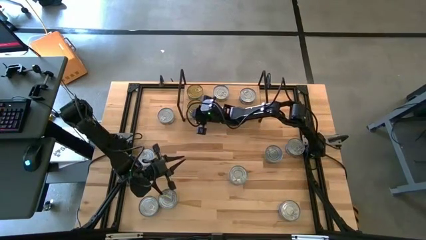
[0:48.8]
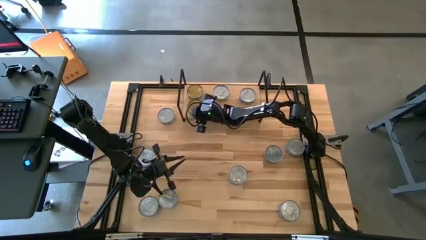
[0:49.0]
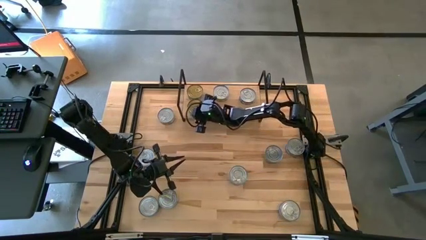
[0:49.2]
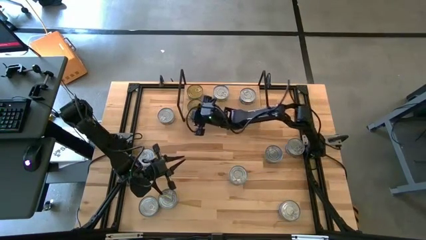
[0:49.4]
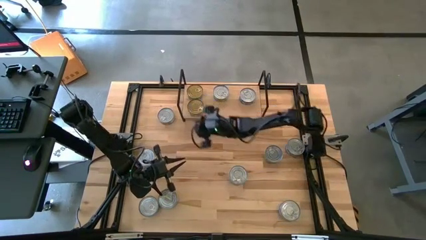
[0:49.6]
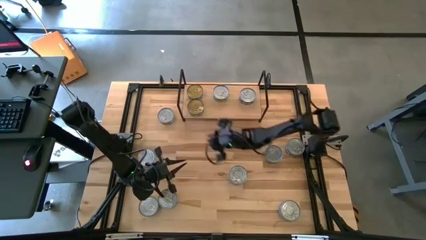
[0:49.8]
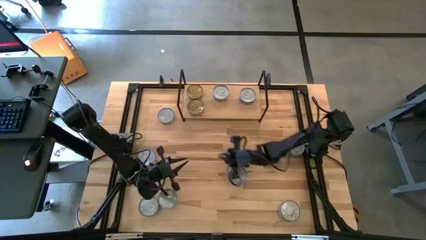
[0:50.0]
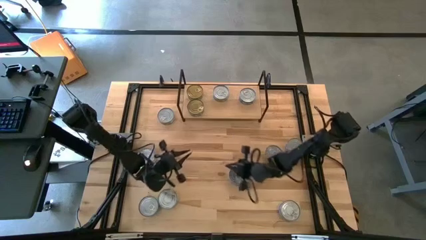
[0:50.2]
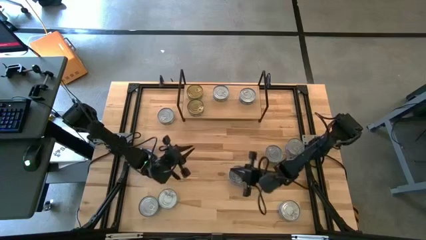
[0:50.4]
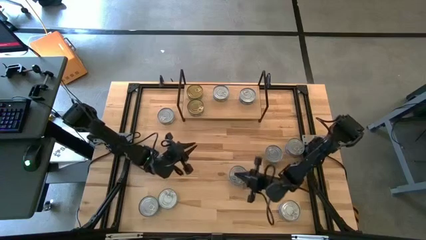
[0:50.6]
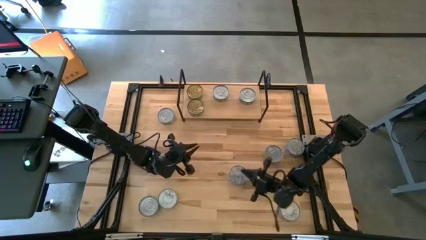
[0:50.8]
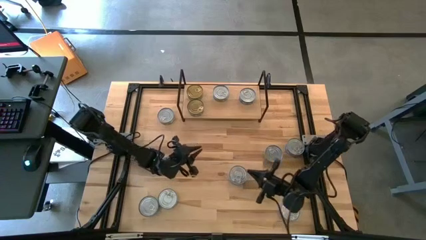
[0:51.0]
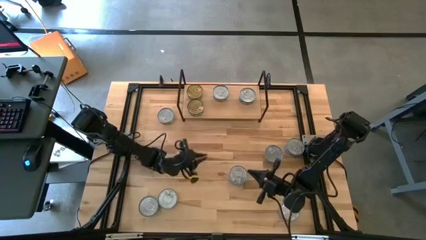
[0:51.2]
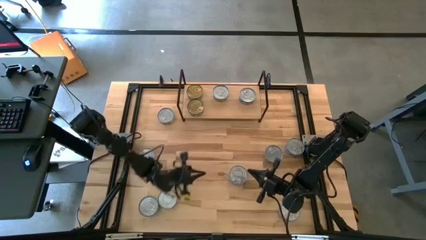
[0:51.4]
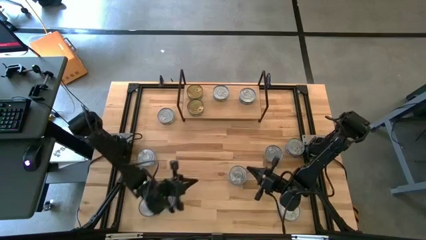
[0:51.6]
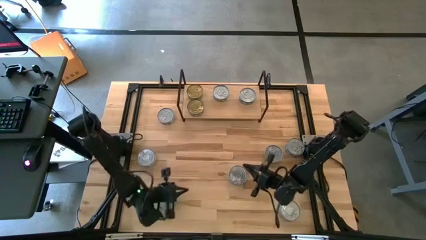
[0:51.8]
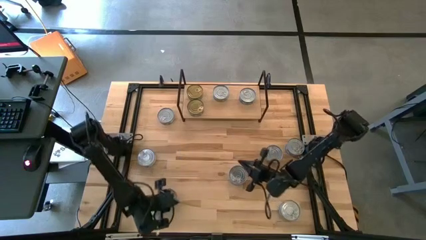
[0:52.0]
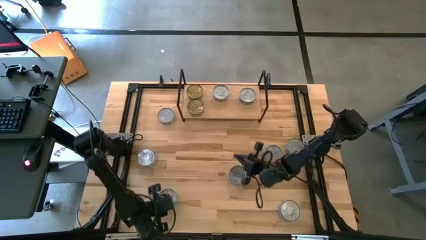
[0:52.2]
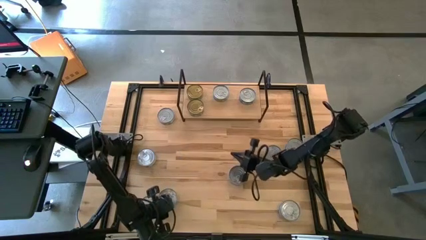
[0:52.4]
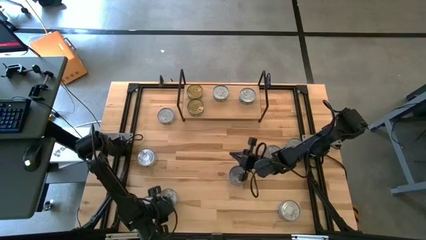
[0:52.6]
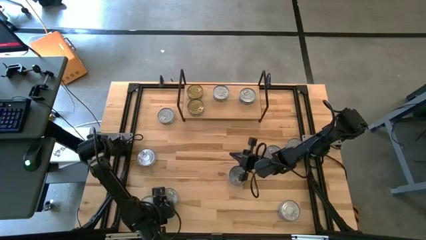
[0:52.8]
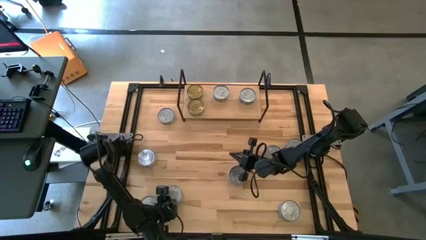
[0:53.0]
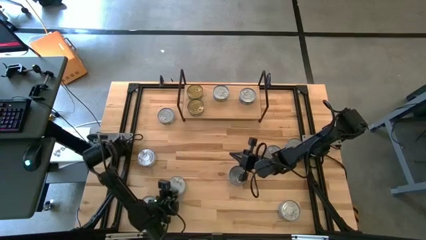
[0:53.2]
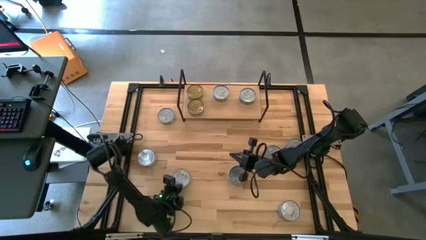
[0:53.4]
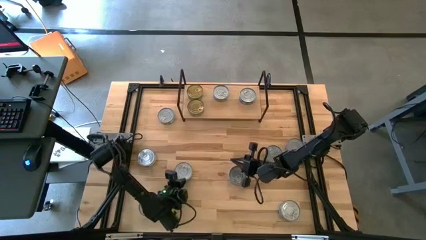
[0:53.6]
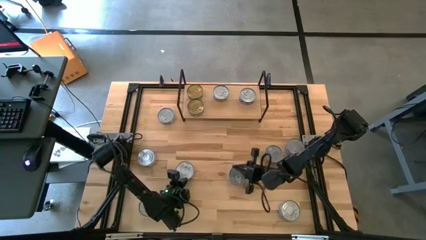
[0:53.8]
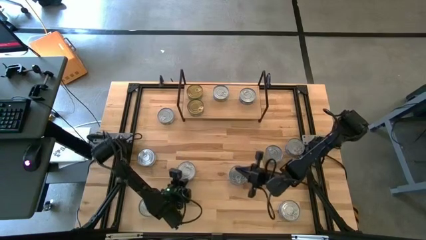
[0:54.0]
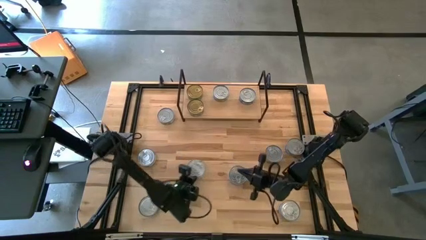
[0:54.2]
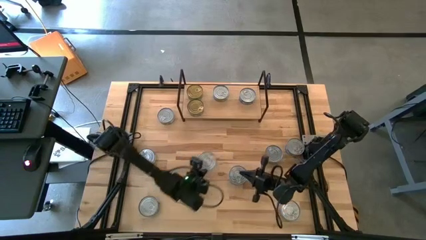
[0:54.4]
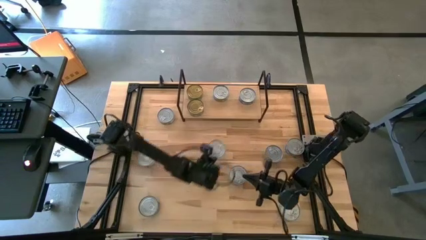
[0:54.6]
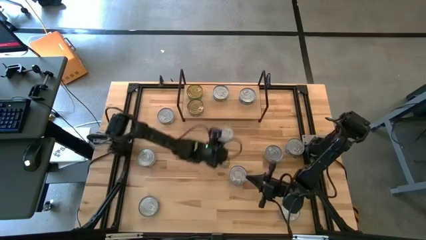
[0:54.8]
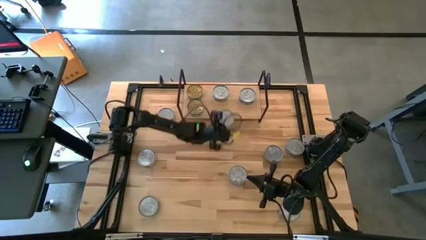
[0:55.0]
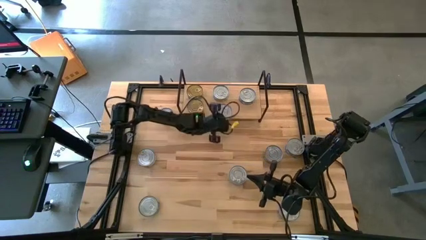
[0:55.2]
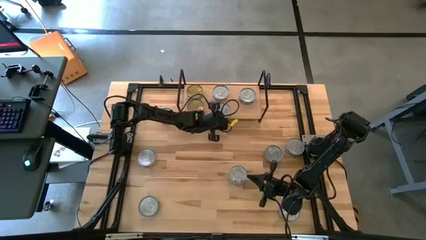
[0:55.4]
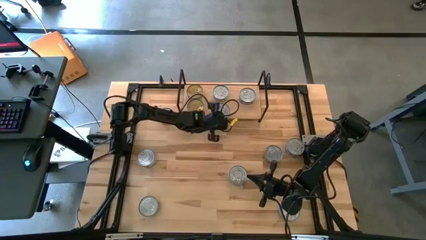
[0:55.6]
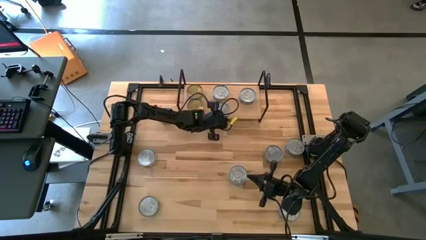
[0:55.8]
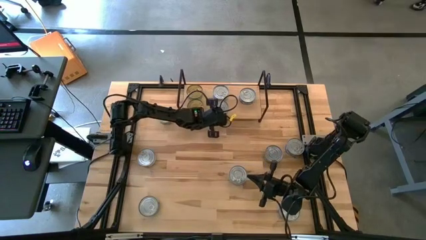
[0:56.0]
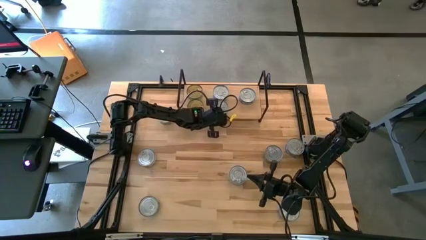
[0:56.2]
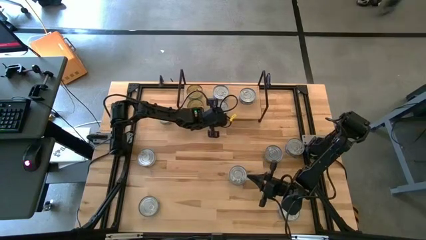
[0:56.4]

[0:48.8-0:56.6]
Task: Stack canned seafood by type on shelf
Put the yellow and blue tuna can aligned with the other yellow and blue tuna can on the shelf

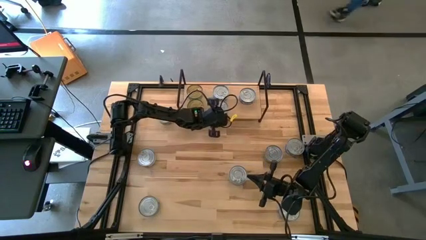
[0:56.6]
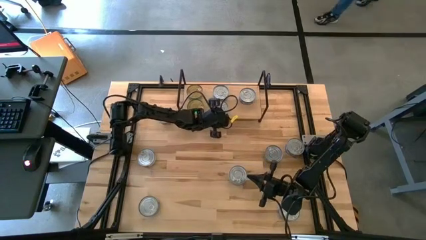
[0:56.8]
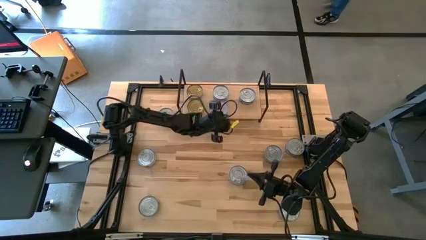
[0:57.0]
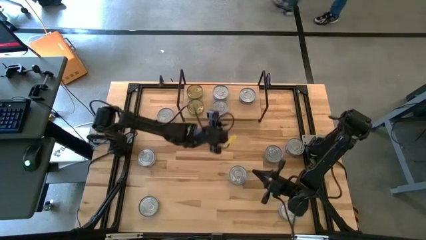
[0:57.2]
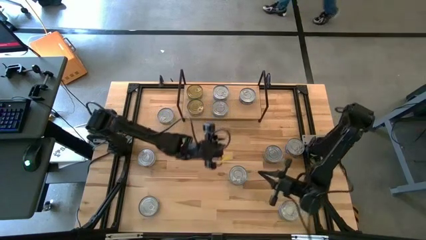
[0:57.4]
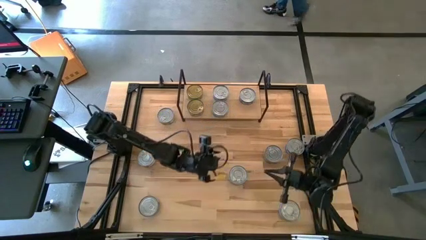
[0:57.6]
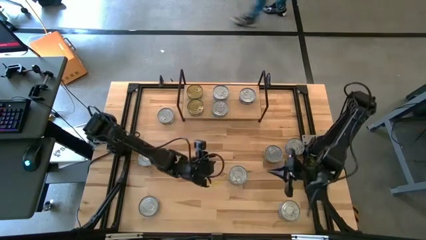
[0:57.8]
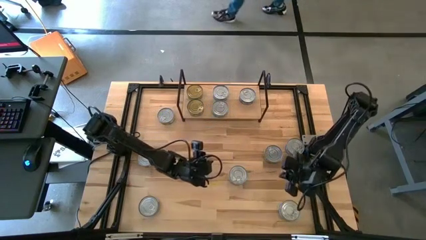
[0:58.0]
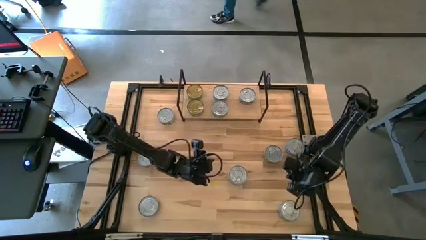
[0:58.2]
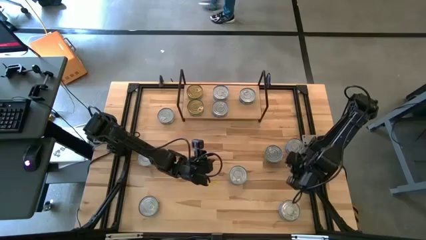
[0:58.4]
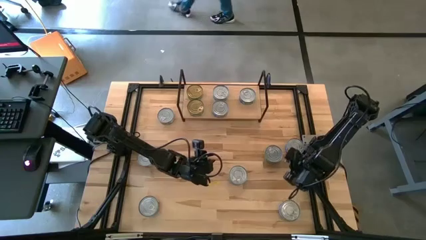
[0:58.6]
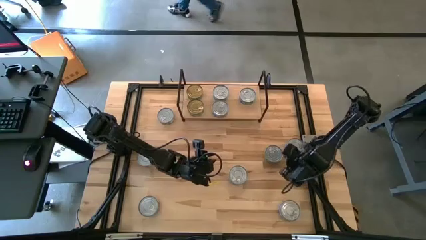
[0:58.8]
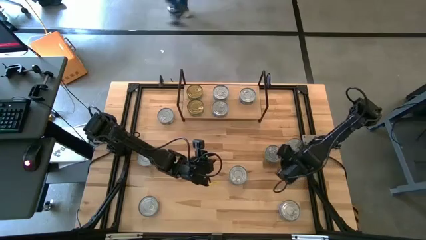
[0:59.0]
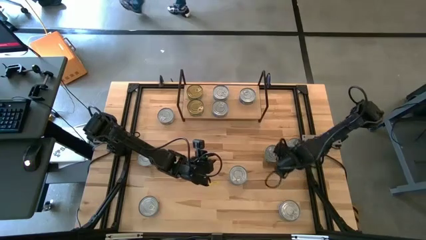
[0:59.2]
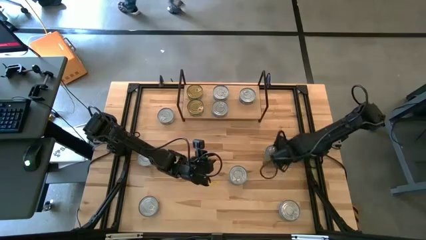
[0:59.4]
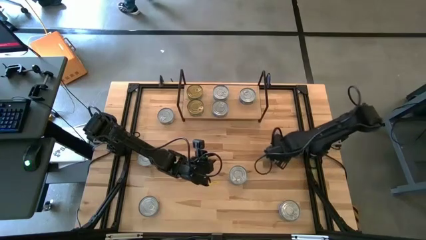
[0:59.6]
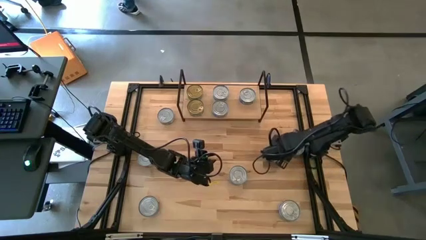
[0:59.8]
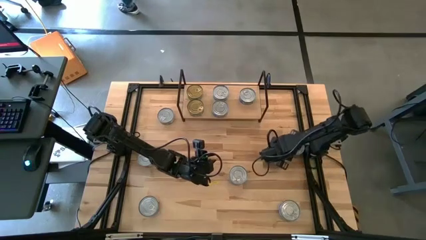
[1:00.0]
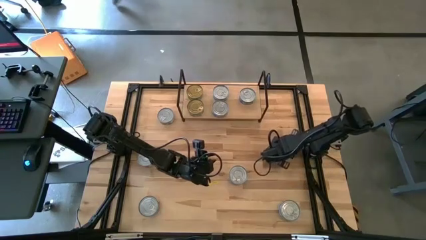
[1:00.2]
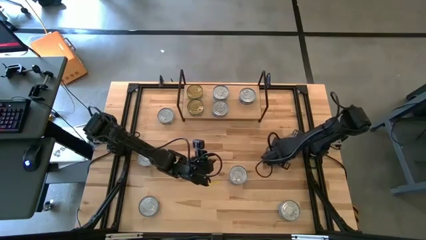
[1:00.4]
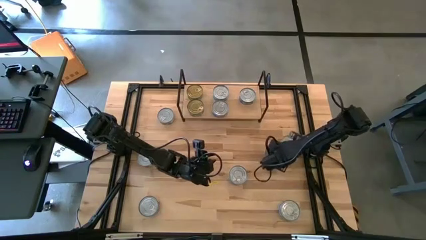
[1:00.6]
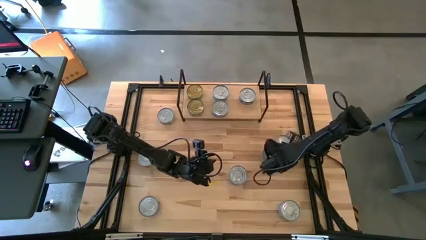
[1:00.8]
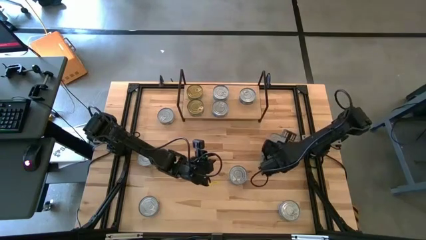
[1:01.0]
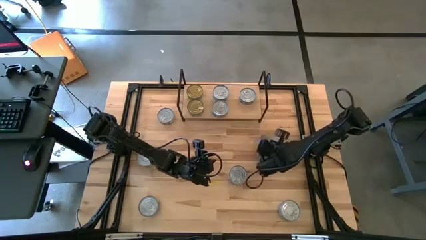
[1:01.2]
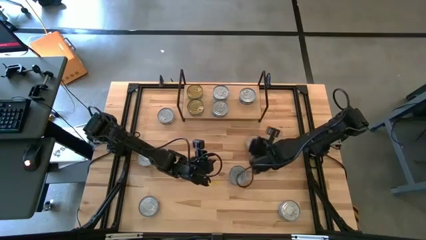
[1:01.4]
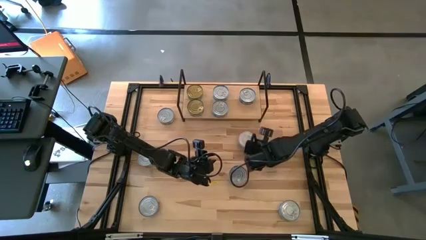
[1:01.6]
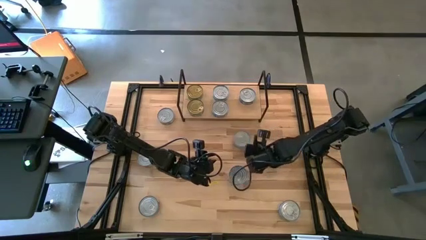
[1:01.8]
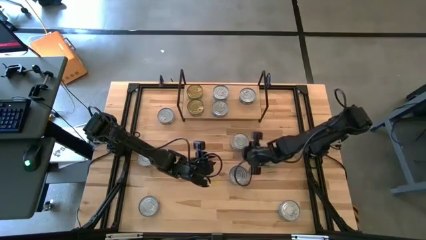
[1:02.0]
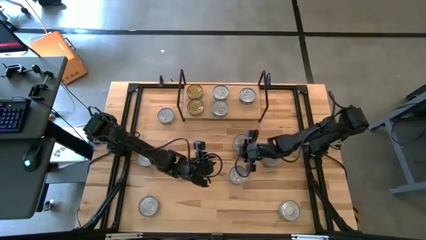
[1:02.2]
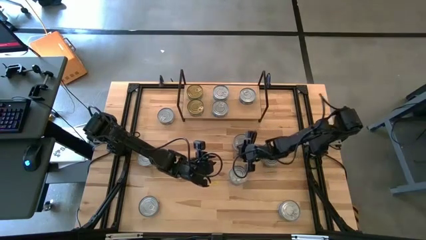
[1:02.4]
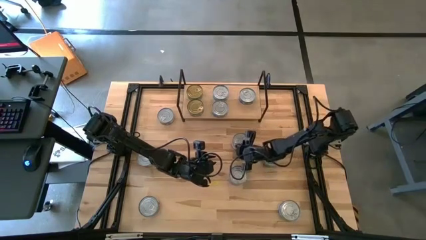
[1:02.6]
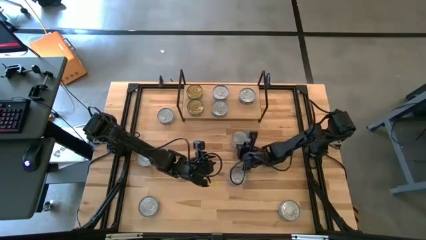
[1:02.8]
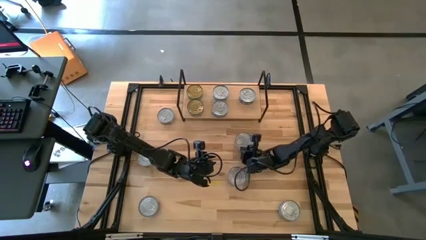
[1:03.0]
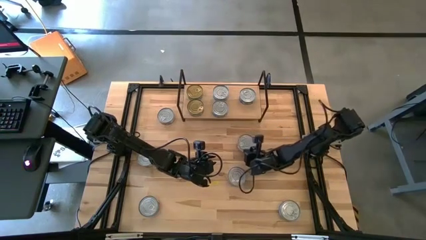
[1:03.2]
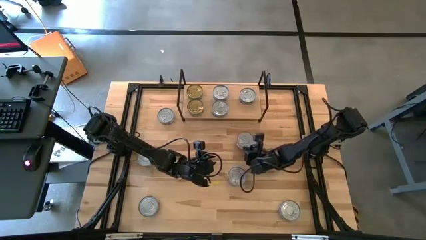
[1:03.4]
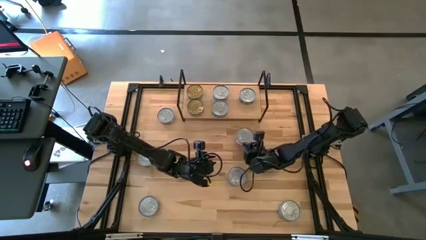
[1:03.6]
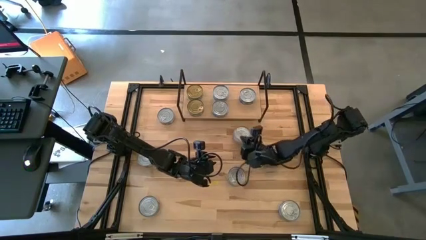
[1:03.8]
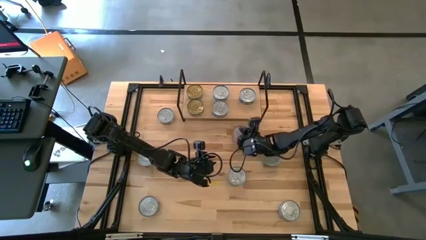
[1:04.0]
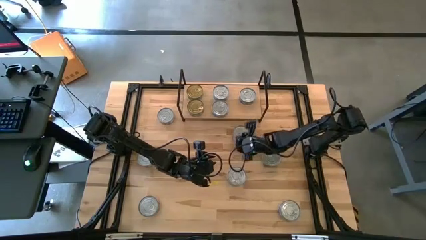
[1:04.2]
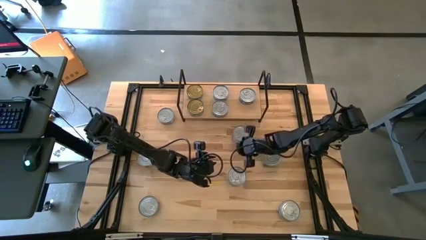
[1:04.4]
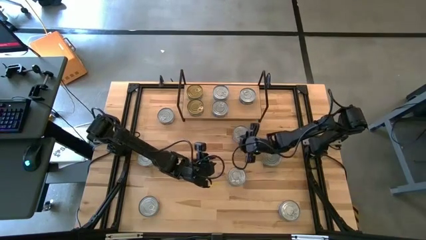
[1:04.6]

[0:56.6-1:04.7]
Put the blue tuna can aligned with the other blue tuna can on the shelf
